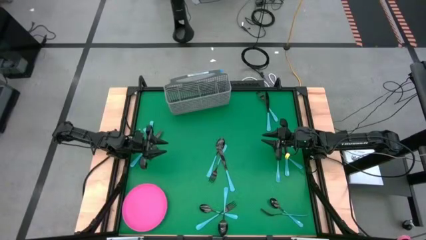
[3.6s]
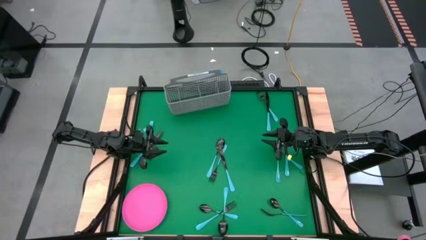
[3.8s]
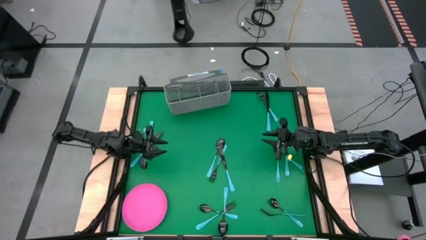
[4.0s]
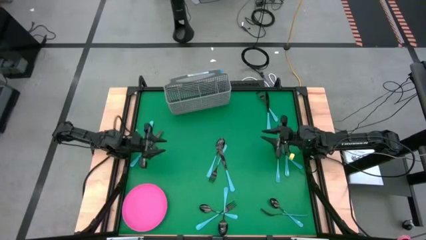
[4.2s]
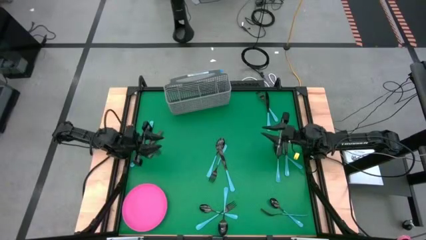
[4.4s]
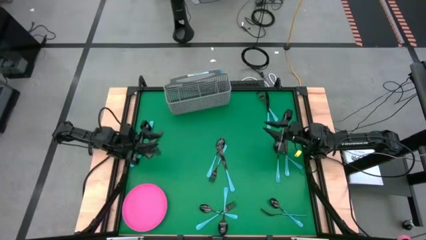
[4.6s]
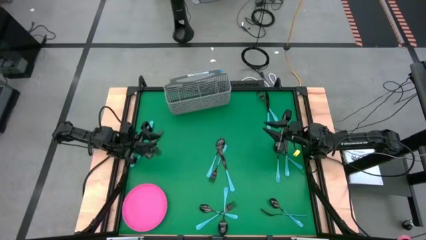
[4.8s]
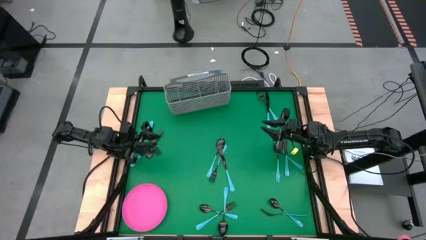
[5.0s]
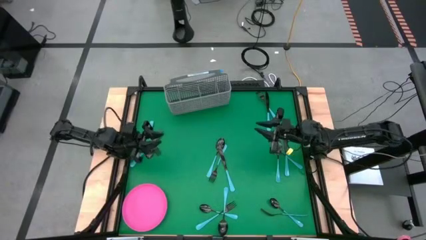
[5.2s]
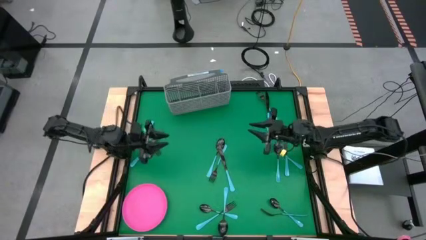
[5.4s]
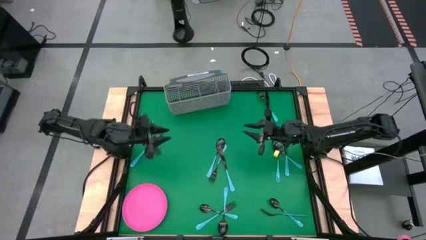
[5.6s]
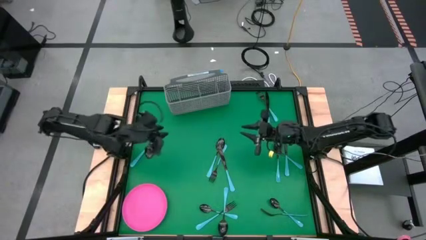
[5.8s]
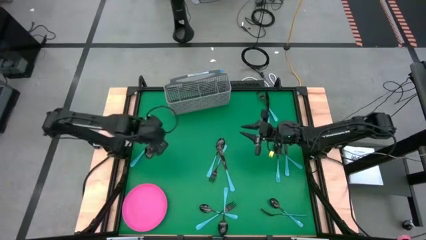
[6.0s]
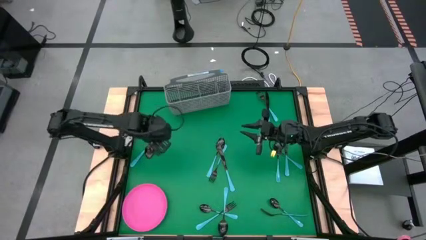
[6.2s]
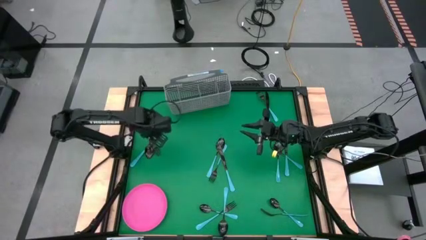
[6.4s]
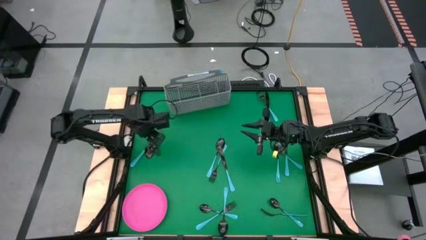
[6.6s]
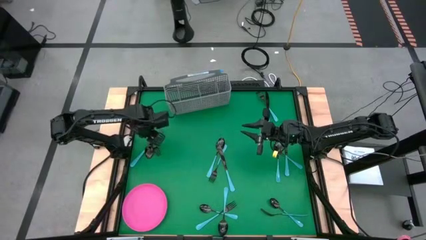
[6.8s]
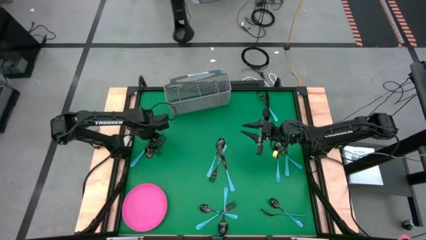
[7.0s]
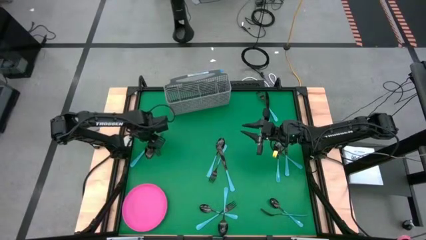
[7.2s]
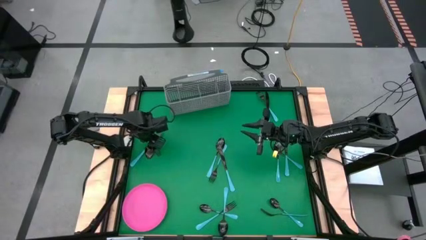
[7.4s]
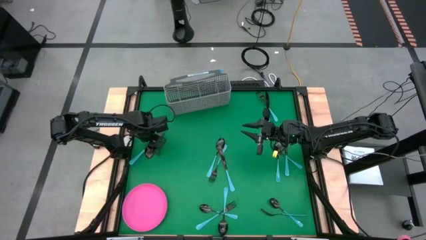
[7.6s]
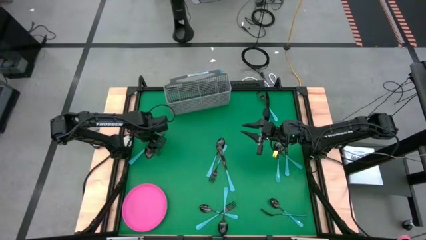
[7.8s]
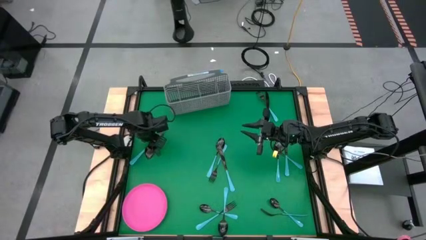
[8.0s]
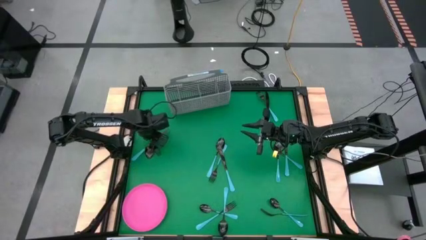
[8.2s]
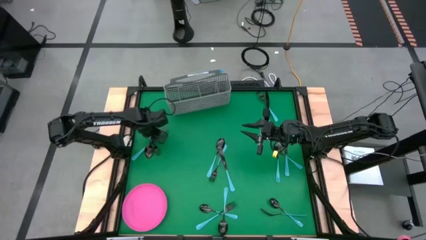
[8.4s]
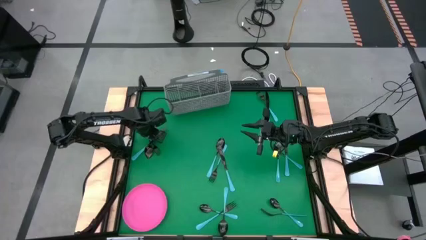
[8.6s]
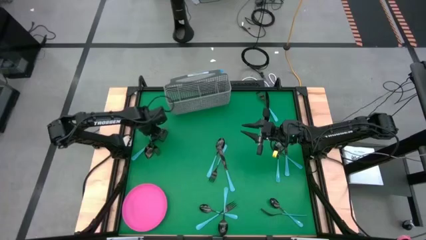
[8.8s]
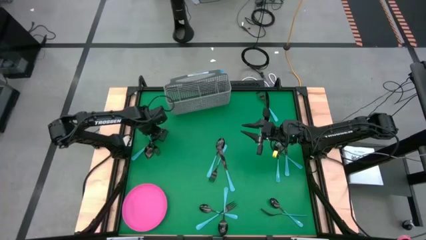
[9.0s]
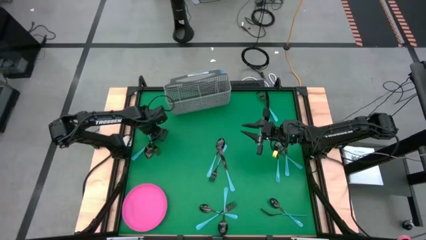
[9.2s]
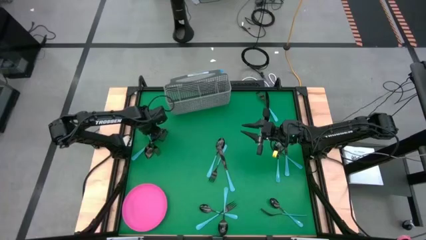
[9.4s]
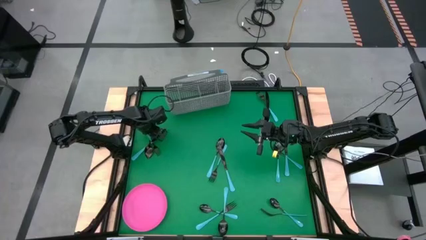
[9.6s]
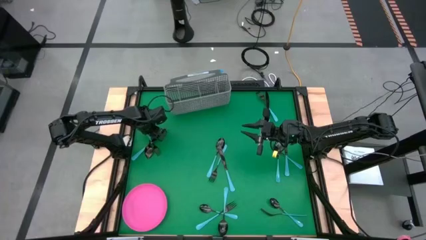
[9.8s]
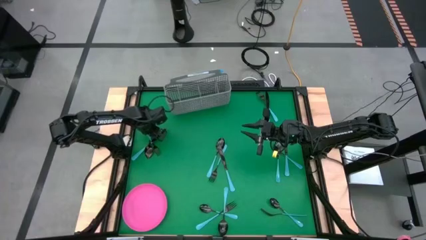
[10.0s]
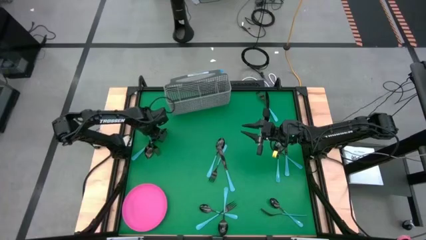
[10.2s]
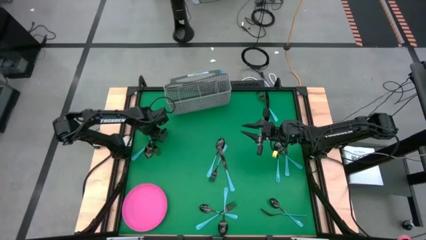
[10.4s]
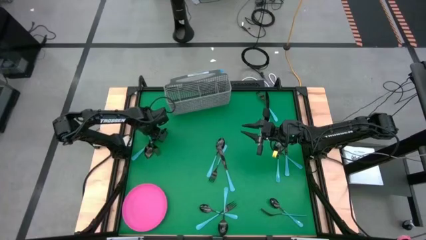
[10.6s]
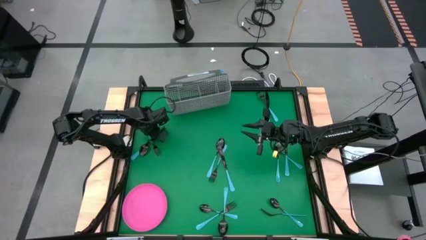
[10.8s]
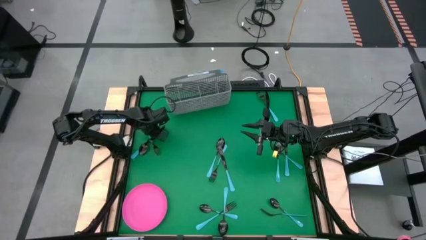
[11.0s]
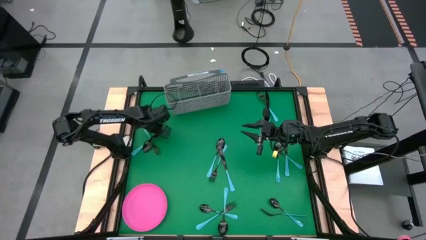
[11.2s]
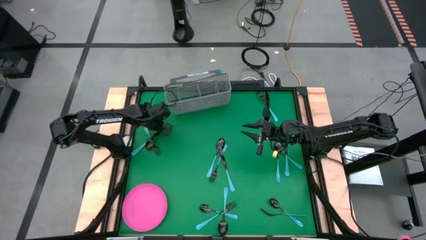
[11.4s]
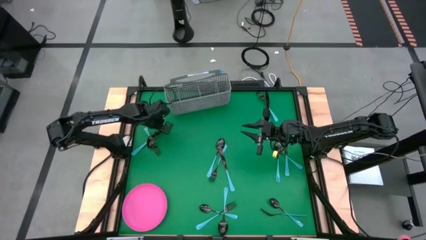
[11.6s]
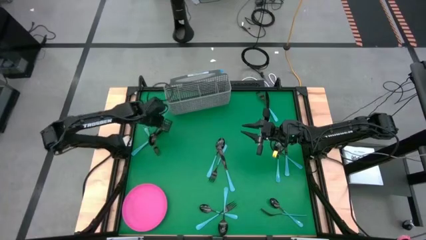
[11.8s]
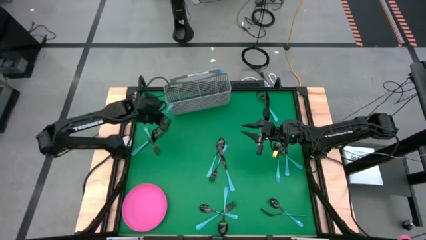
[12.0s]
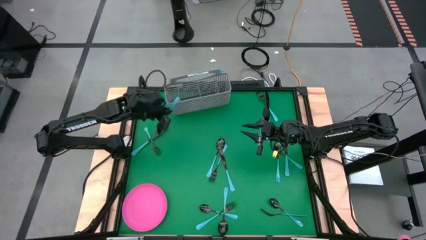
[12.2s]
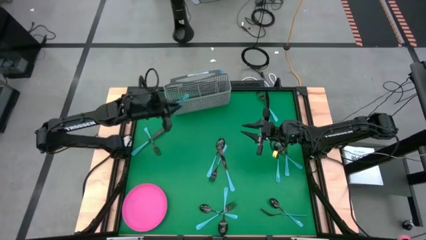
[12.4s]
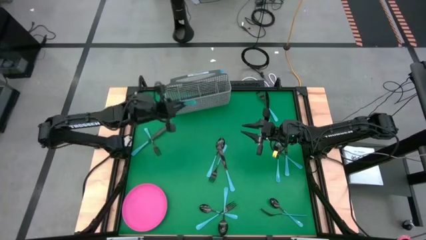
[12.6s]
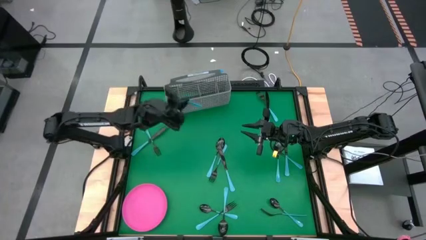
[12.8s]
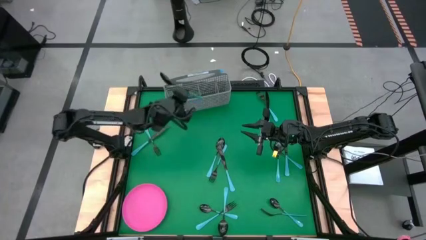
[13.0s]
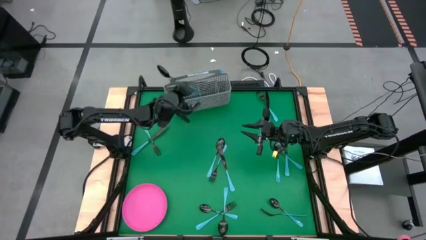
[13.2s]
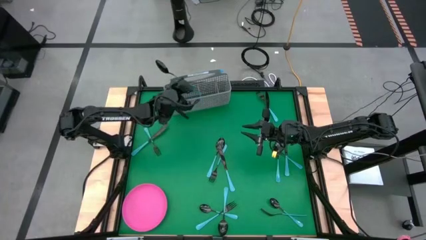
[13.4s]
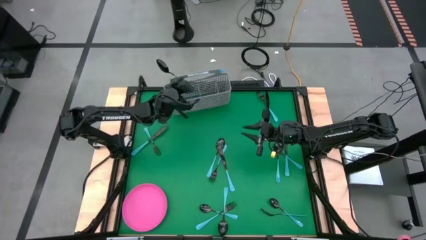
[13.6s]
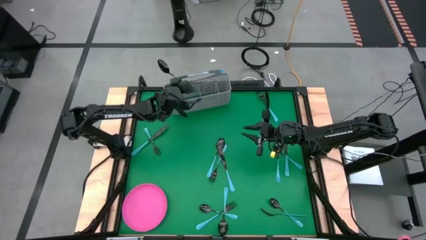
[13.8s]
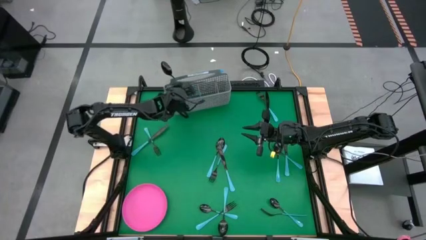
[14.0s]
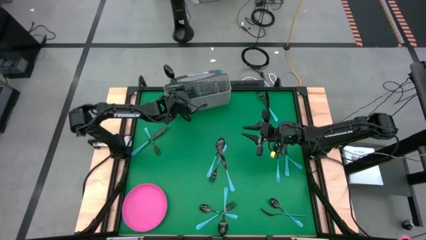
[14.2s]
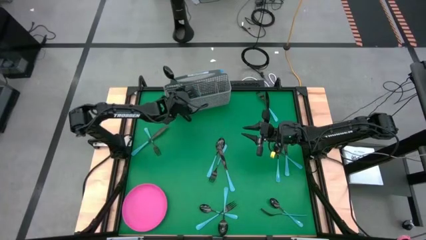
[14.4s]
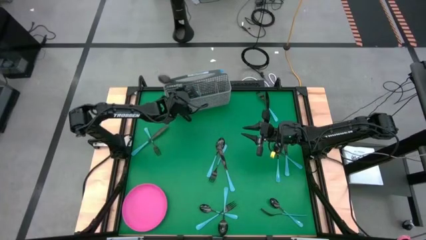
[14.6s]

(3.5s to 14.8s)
Task: Sort silverware
Put the blue spoon into the silverware basket

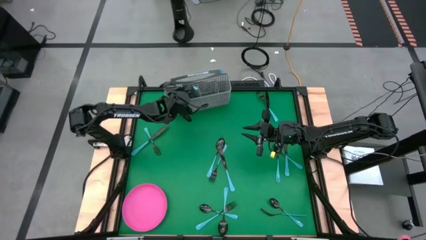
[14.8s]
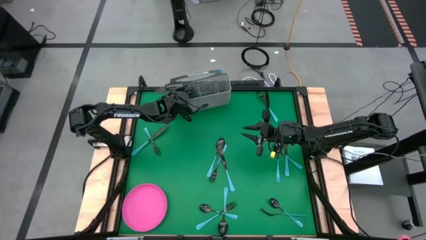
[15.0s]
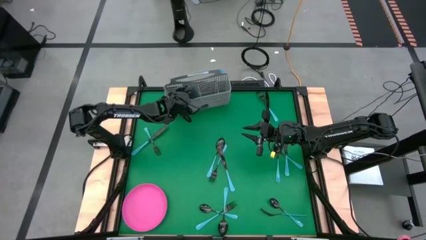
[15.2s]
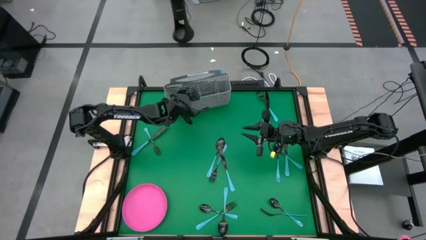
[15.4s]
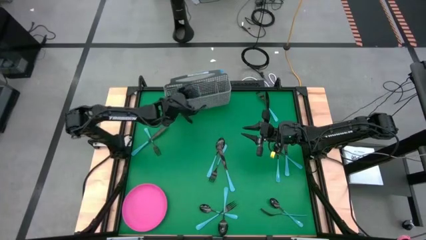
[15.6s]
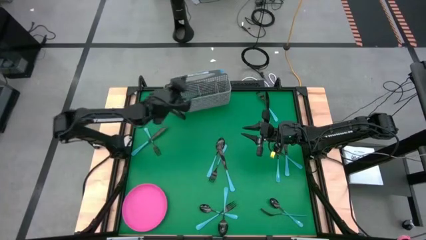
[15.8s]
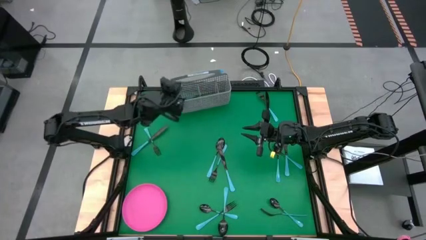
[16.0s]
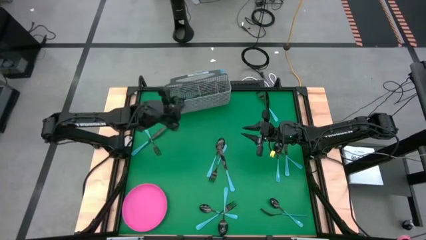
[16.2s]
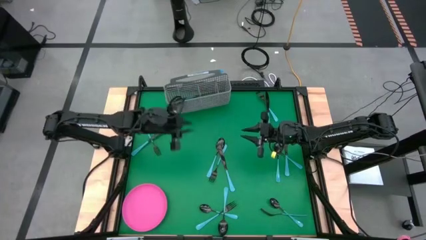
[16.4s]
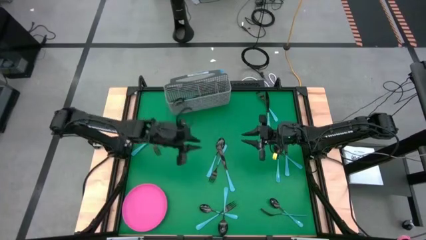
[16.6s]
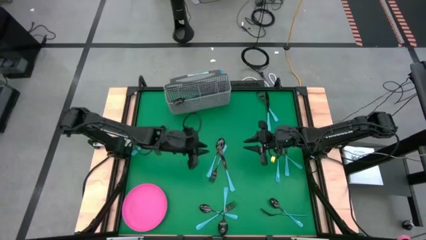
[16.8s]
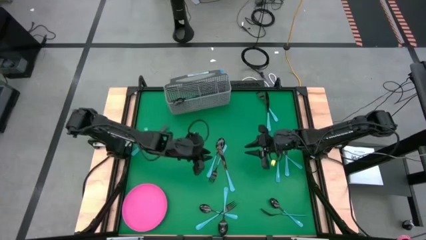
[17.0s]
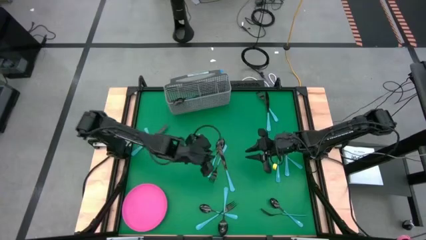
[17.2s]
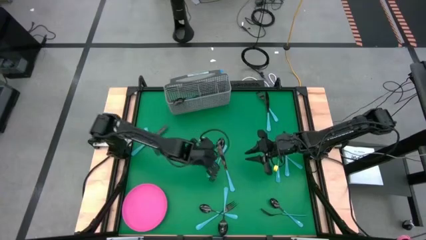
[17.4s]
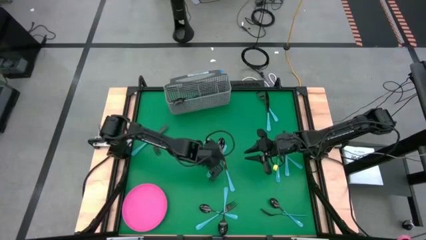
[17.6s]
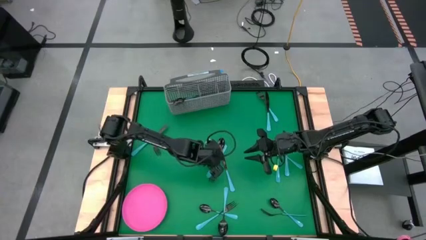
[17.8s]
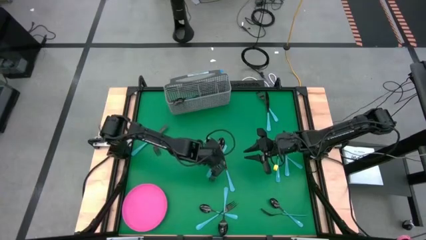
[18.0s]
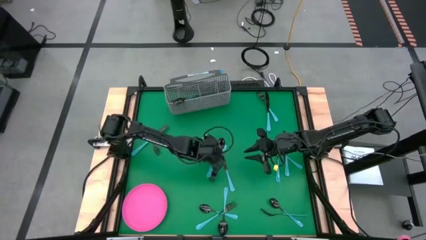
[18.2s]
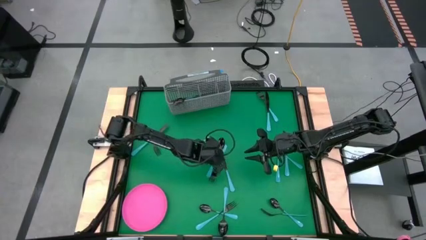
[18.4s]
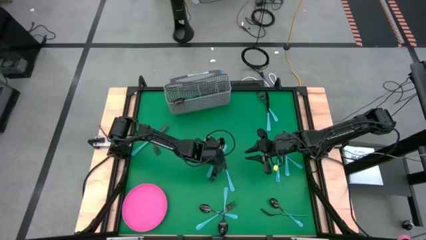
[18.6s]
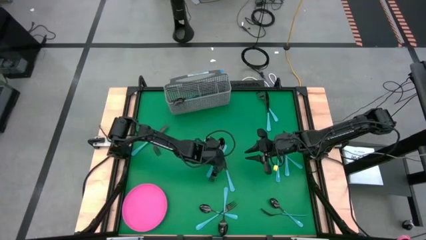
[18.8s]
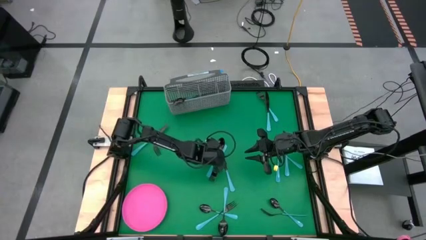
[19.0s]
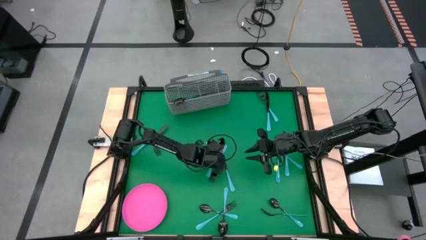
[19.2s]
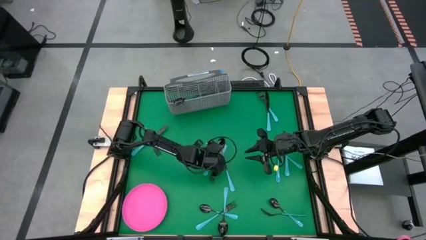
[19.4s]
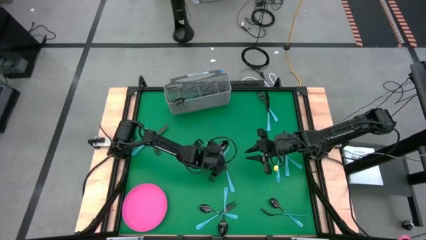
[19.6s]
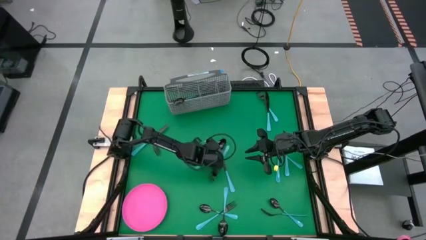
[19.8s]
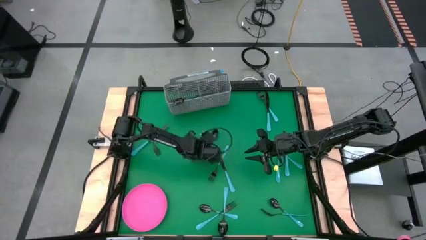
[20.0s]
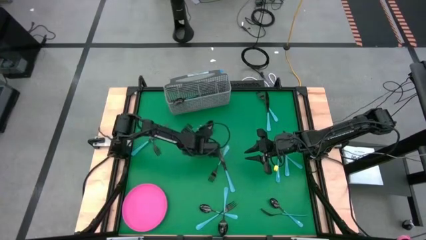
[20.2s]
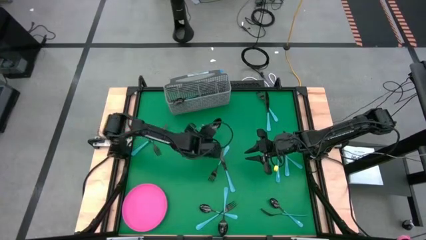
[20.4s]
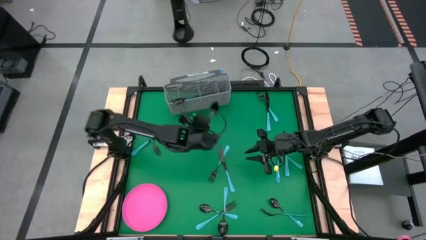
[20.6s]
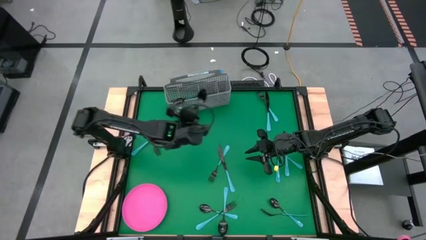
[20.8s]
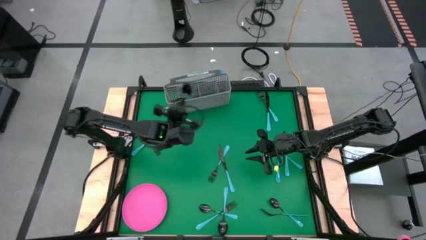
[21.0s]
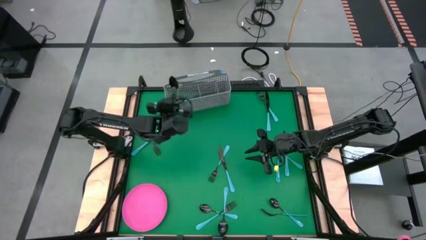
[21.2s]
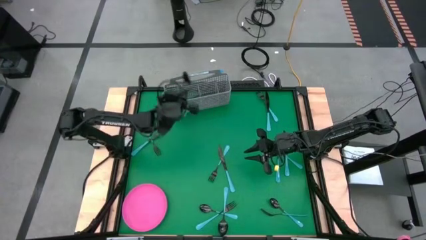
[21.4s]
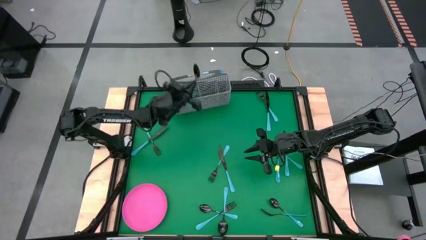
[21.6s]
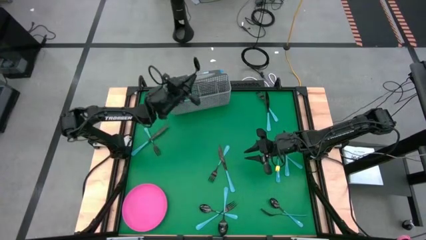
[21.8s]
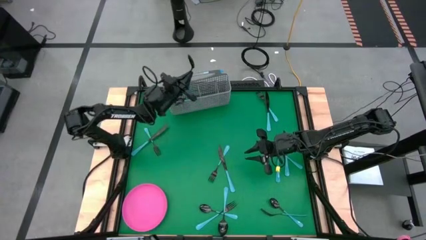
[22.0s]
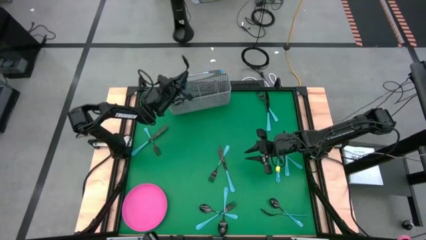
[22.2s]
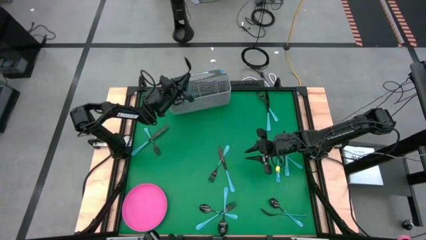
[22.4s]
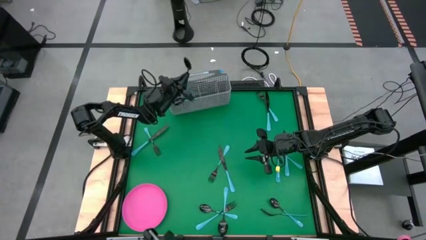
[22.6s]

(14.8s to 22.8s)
Put the blue spoon into the silverware basket
